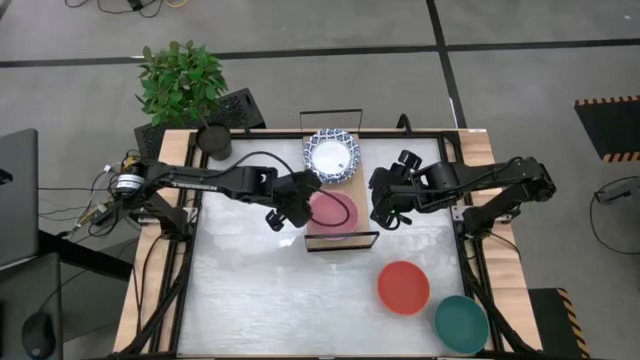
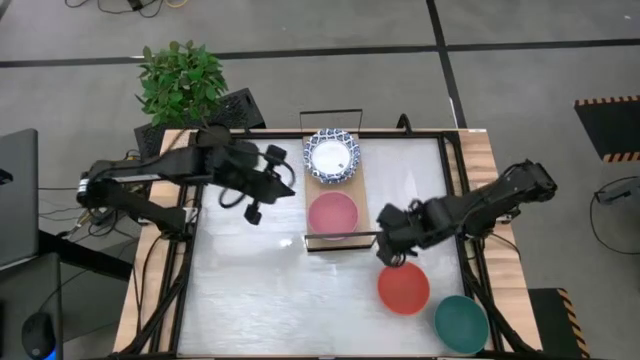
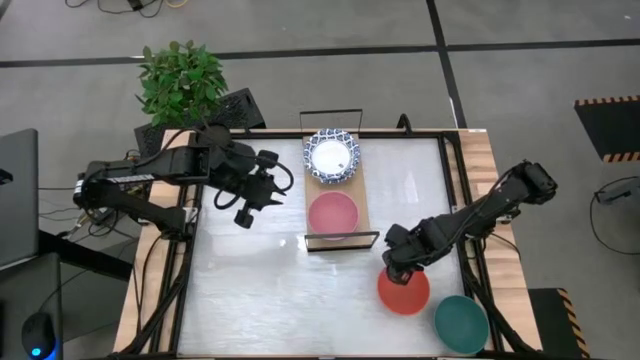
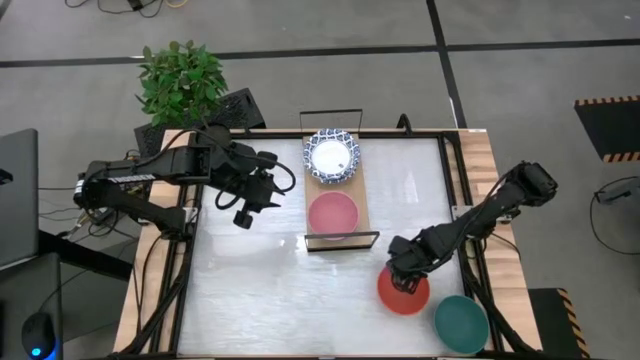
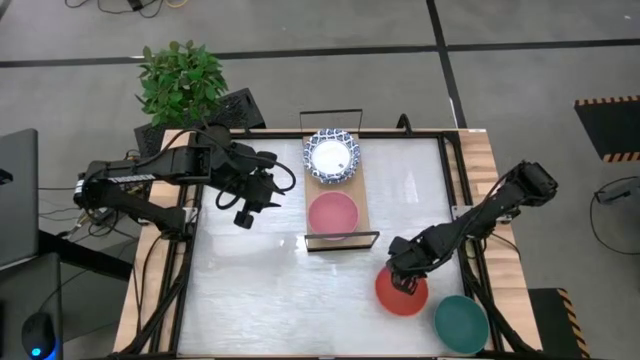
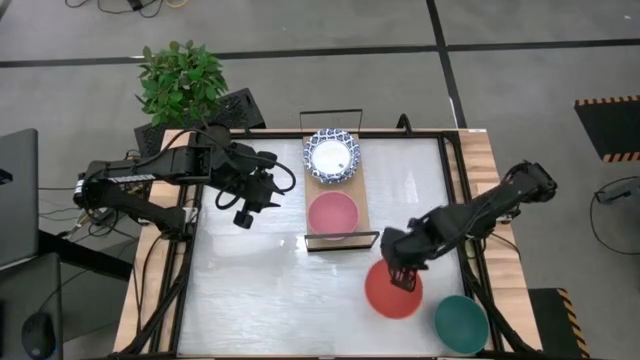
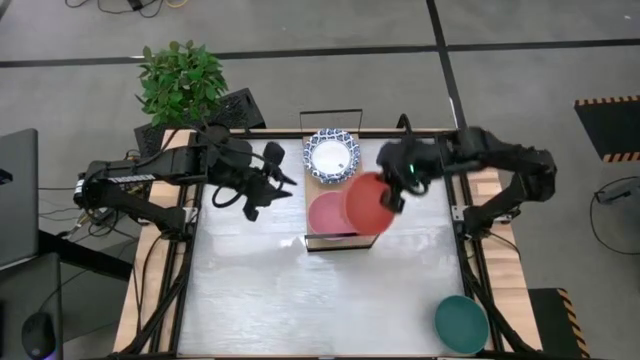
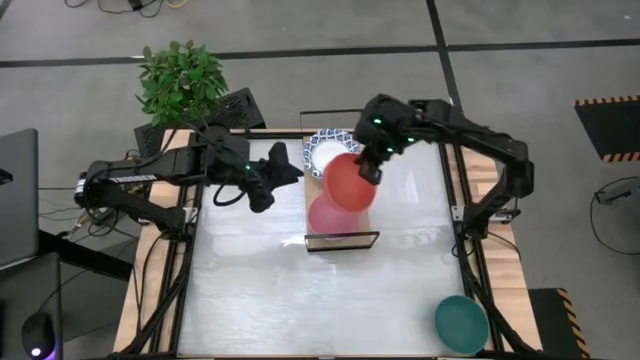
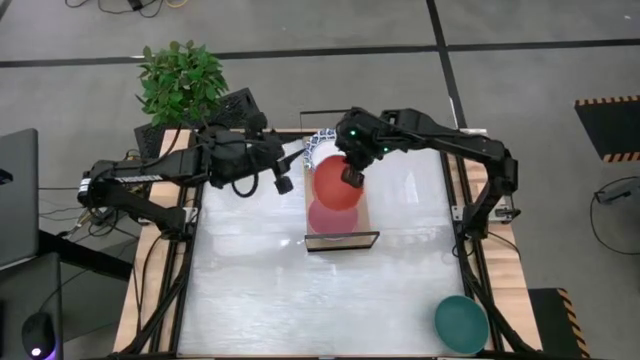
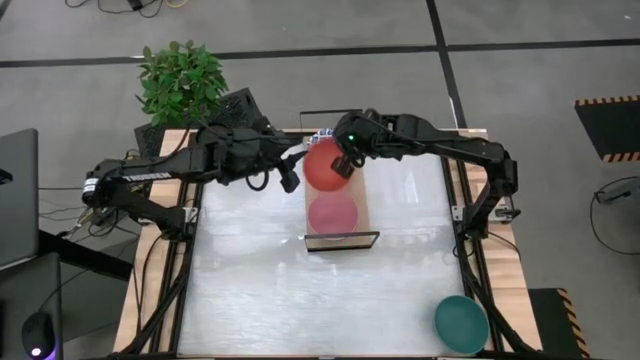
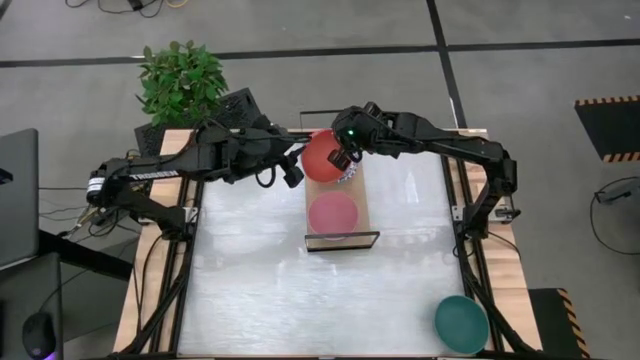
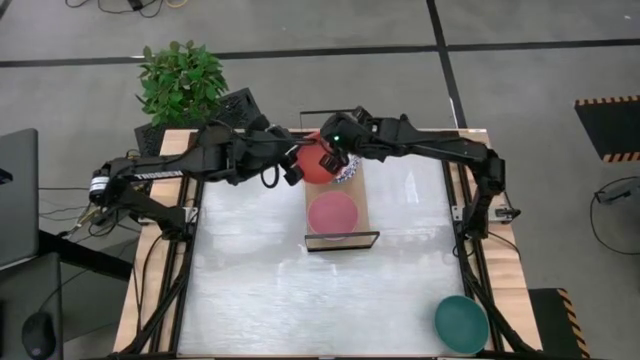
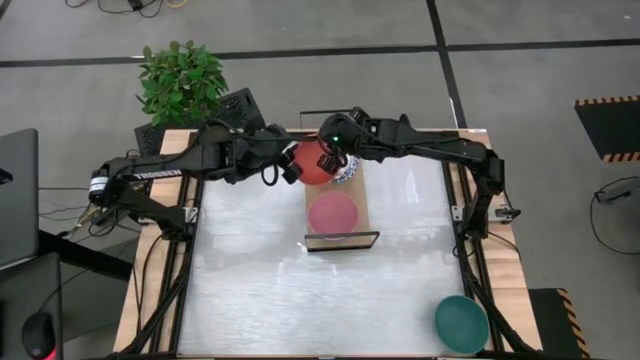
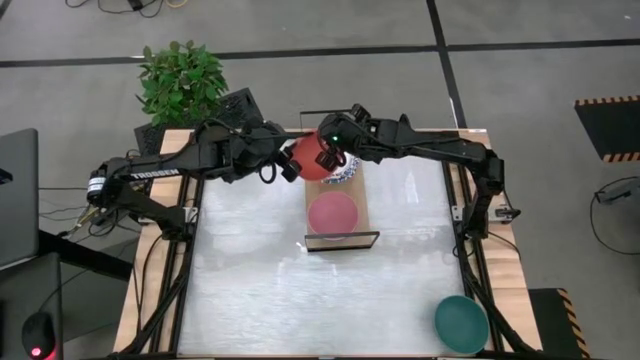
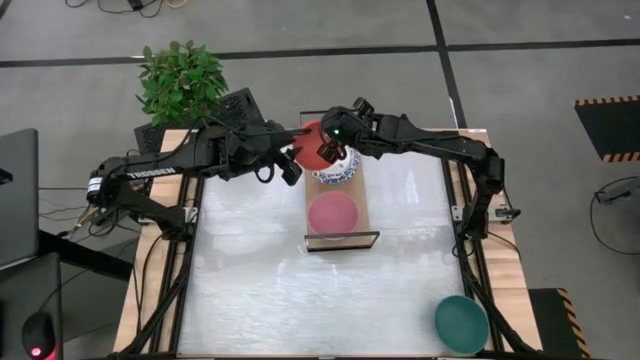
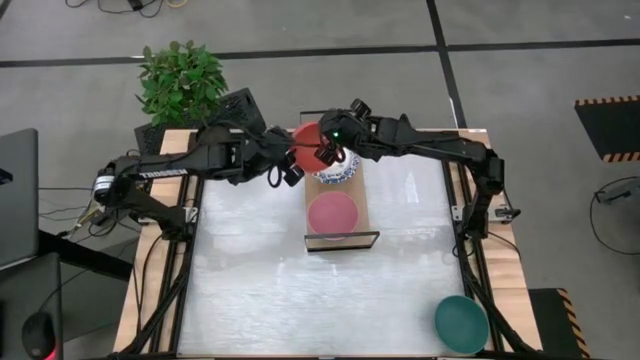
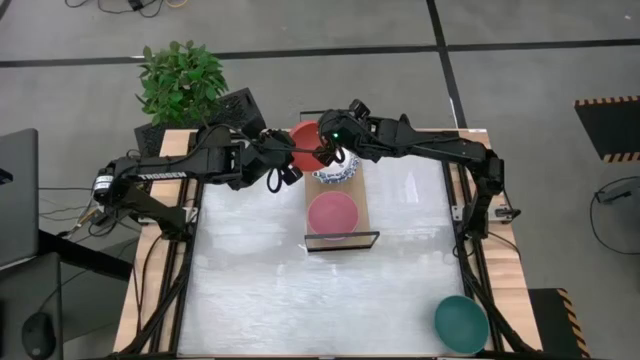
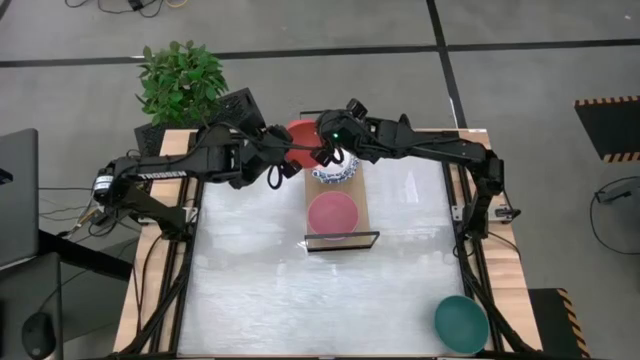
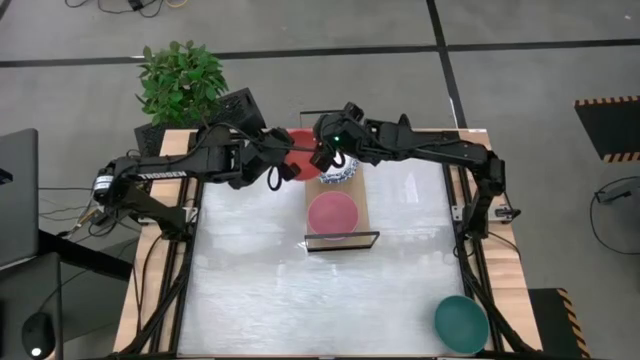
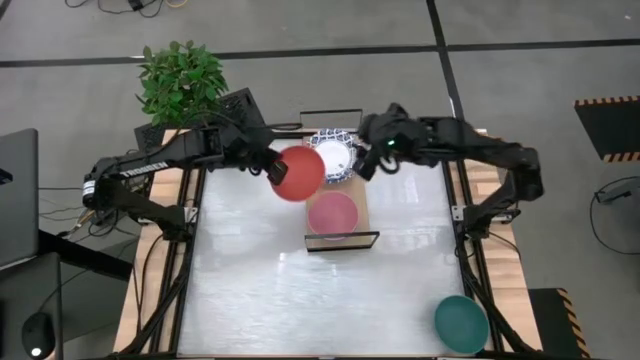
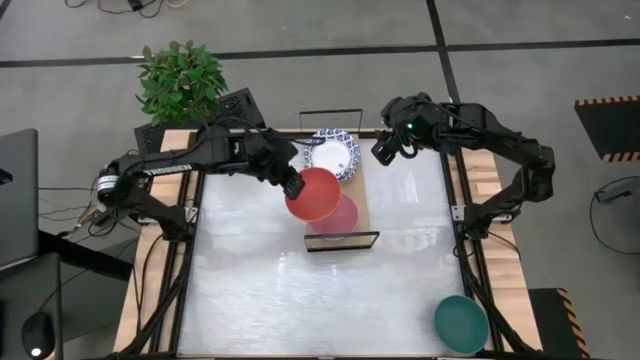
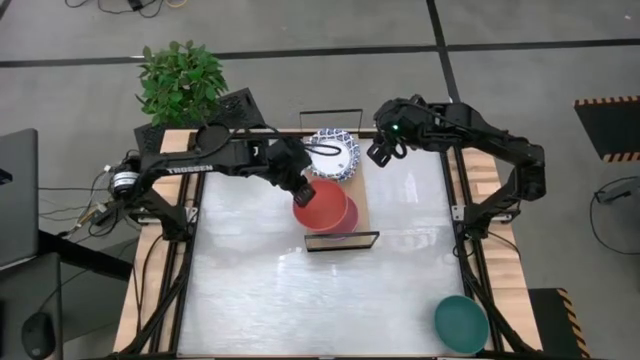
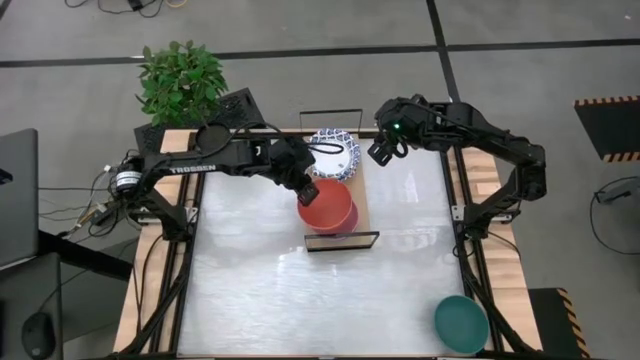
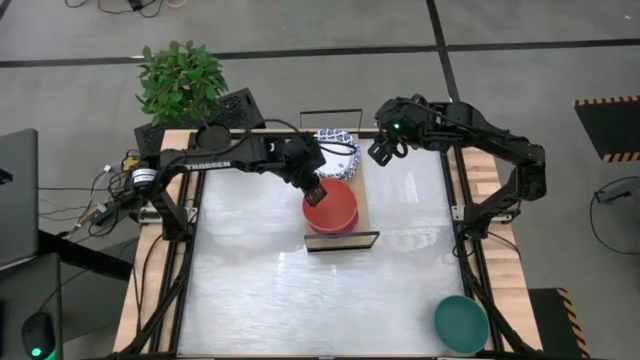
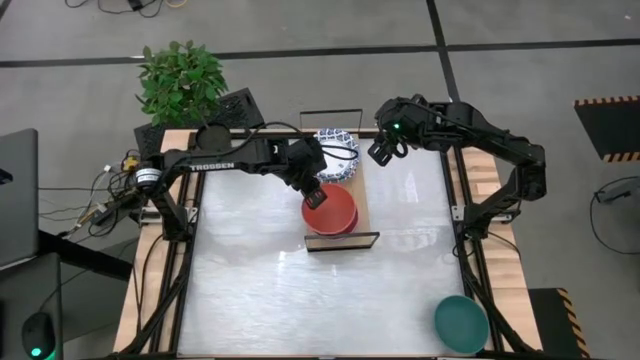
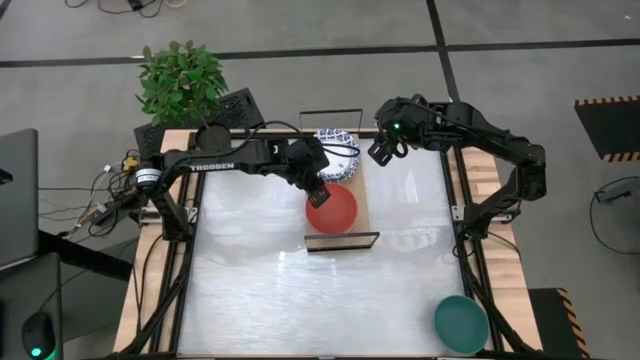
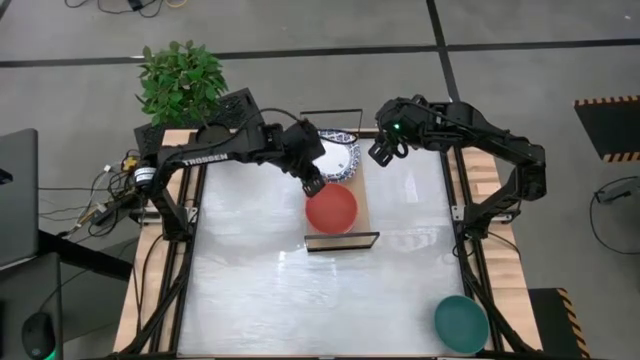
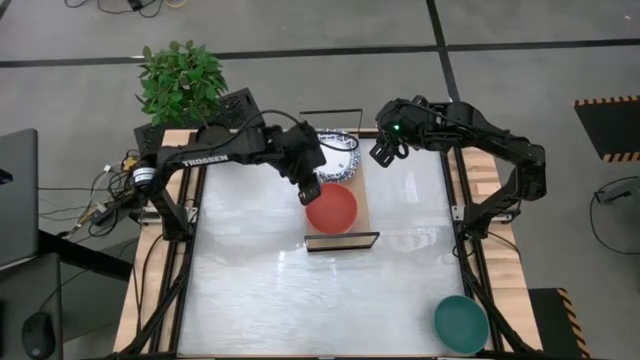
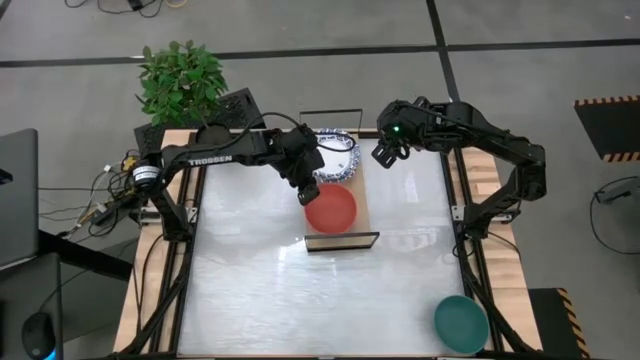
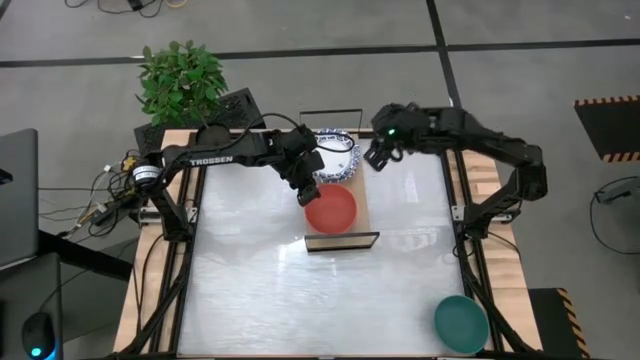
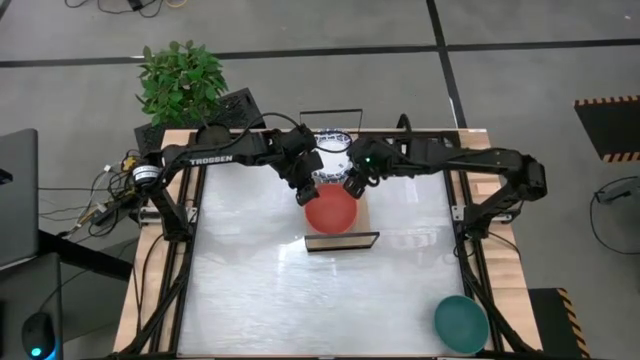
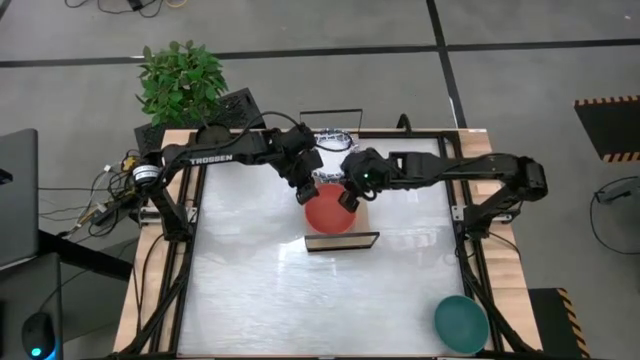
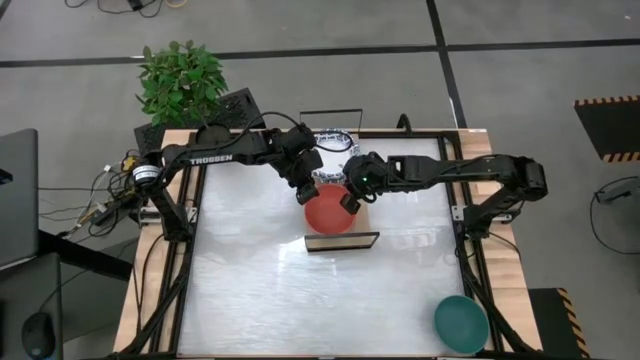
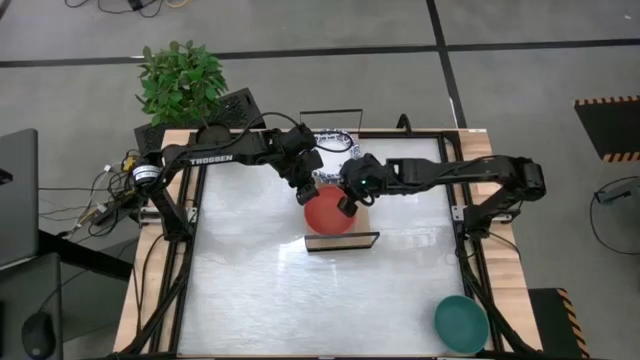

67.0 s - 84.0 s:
Task: Place and stack bowls onto a shelf
Stack the orange bowl on top of the pink bowl on the shelf

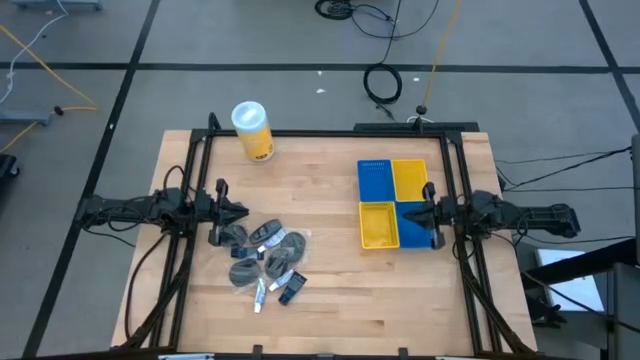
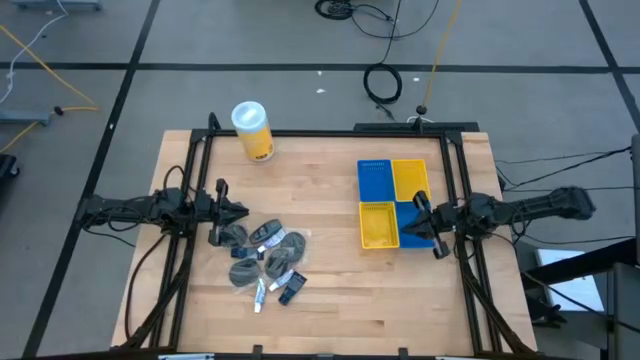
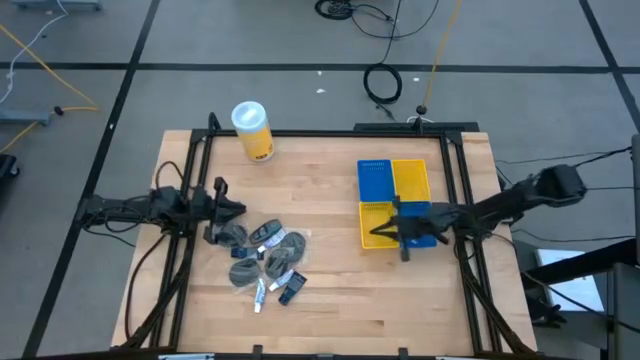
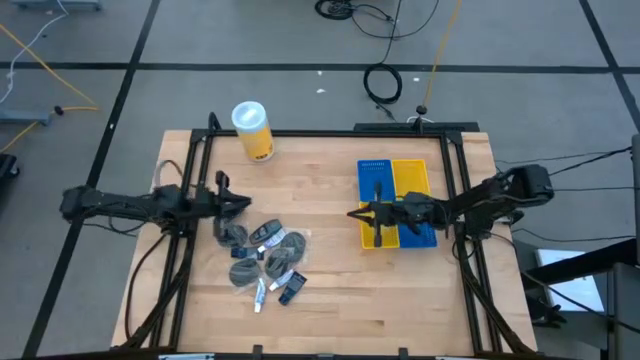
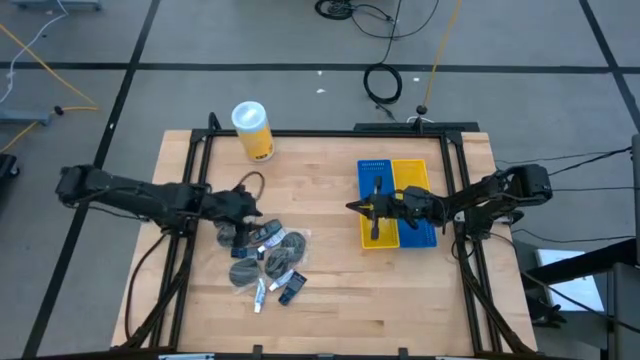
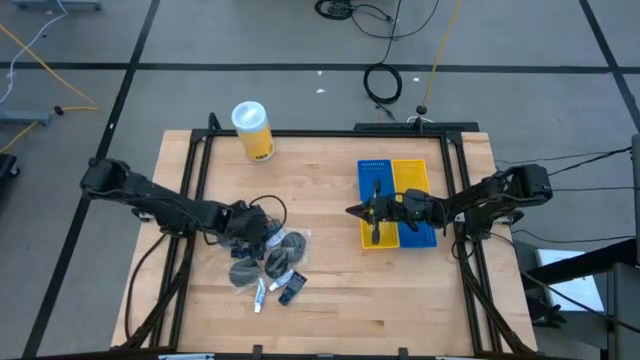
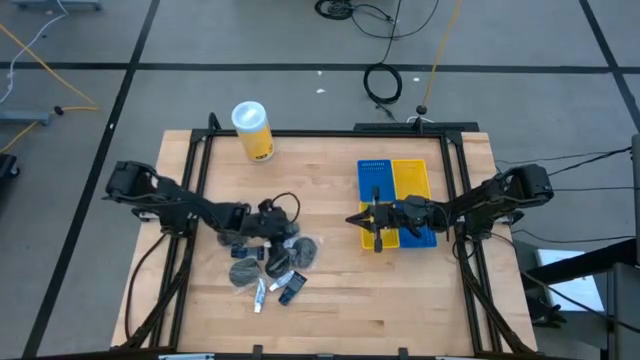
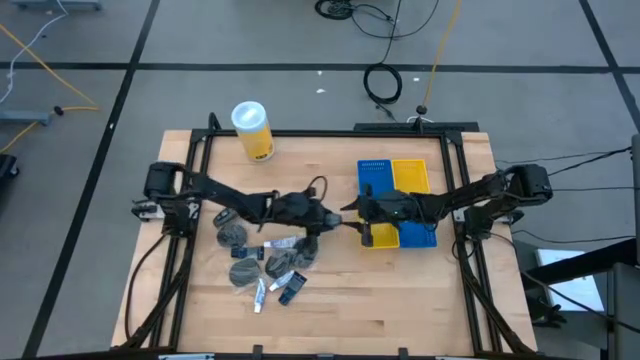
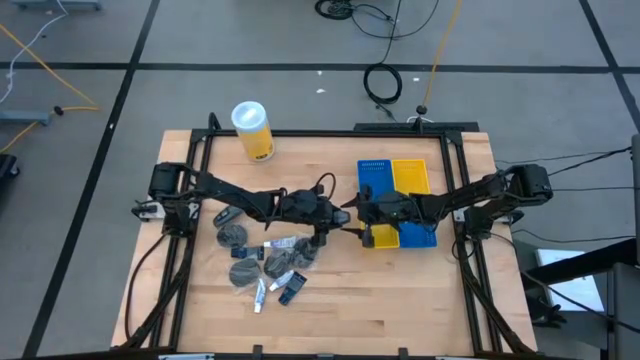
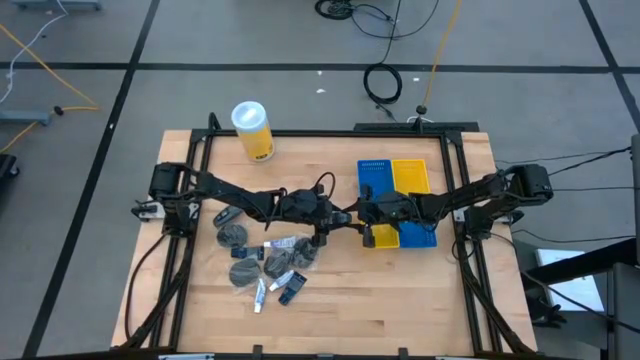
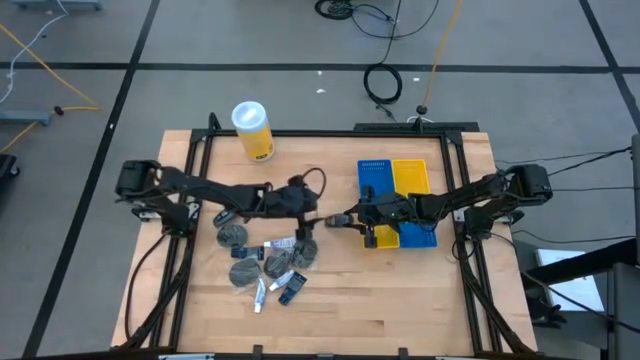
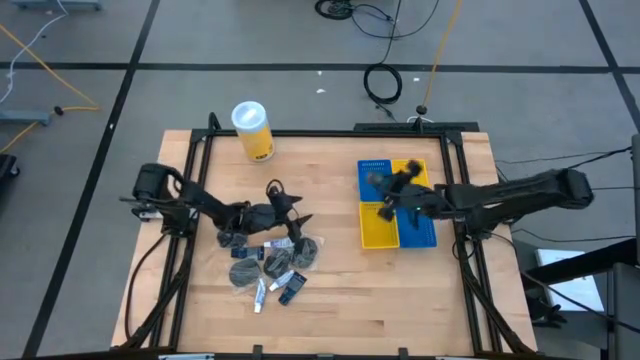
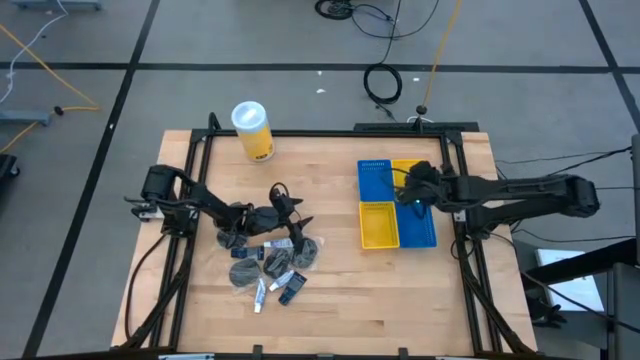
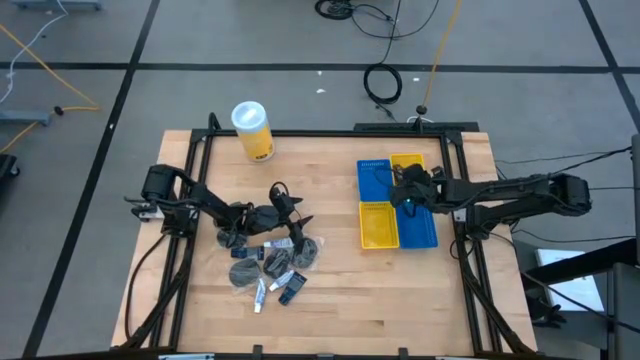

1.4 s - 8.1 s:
Task: Pick & Place Travel size toiletries
Put the gray deodorant into the top yellow bin
